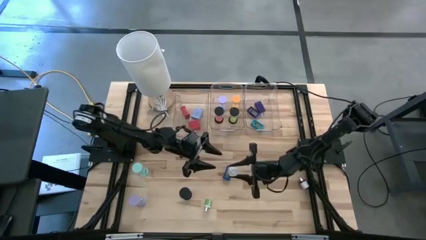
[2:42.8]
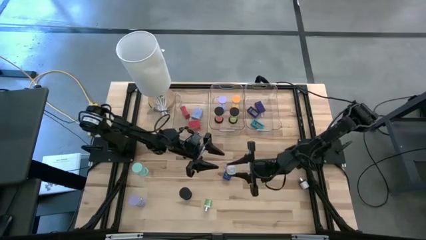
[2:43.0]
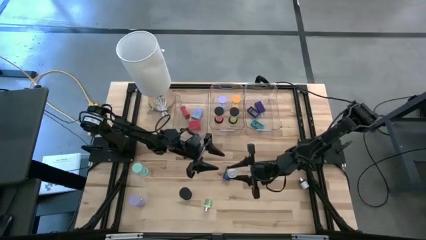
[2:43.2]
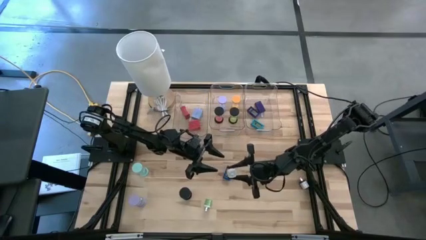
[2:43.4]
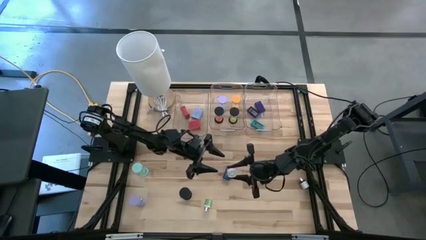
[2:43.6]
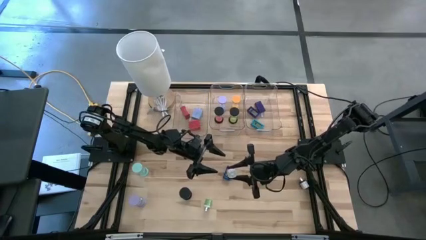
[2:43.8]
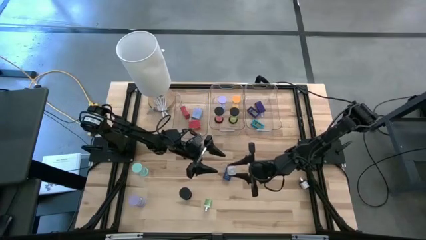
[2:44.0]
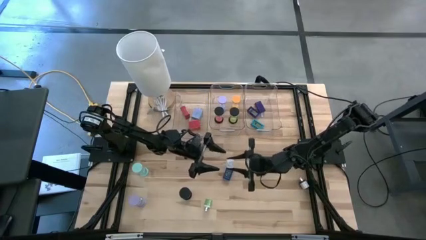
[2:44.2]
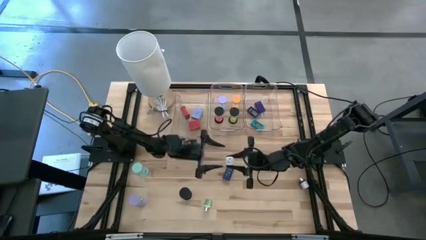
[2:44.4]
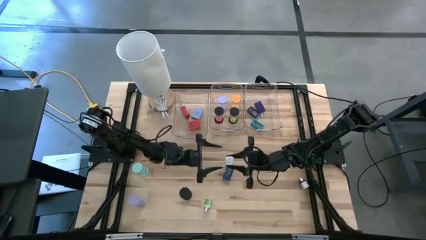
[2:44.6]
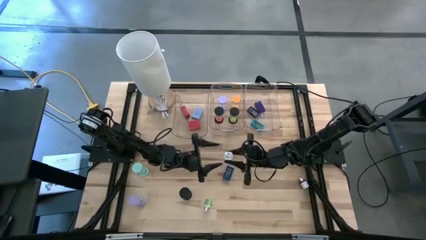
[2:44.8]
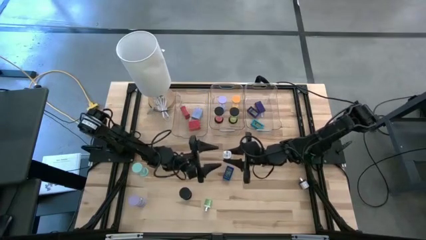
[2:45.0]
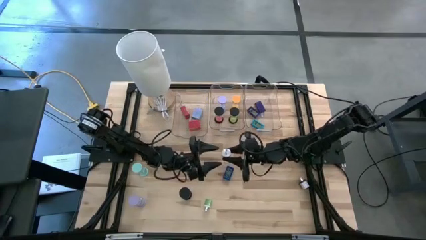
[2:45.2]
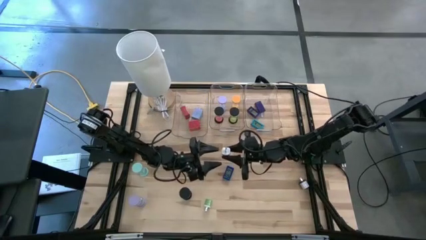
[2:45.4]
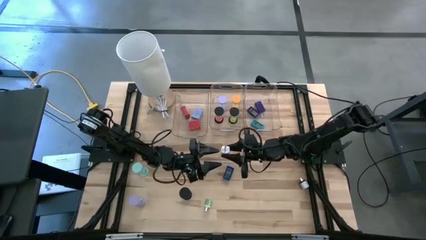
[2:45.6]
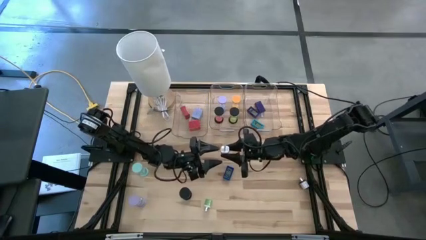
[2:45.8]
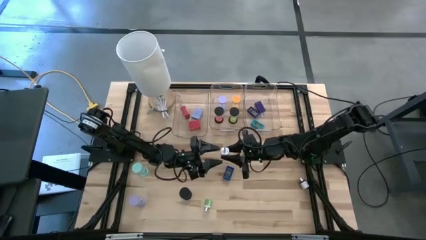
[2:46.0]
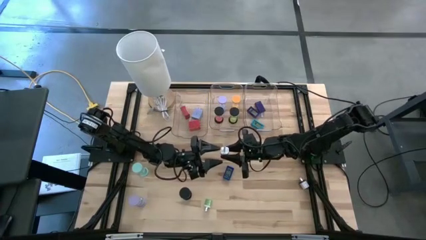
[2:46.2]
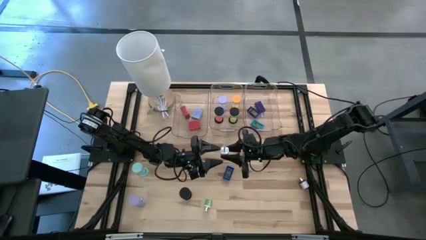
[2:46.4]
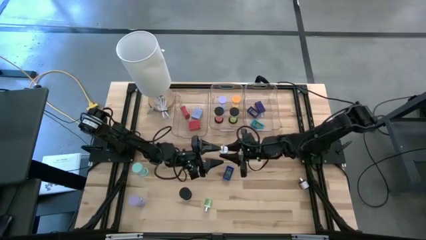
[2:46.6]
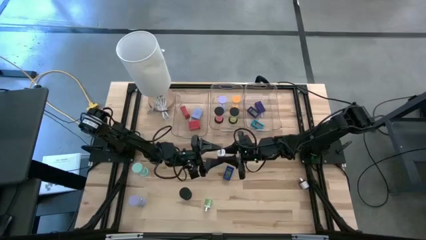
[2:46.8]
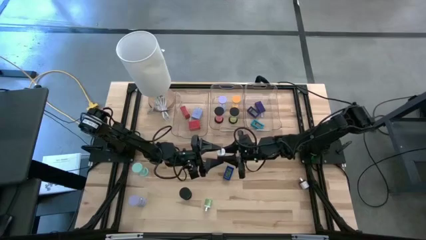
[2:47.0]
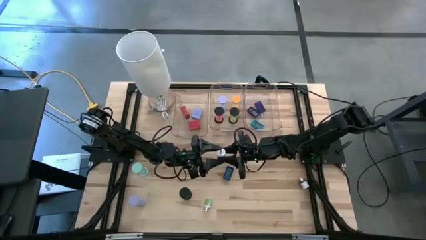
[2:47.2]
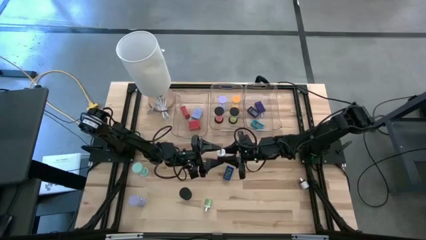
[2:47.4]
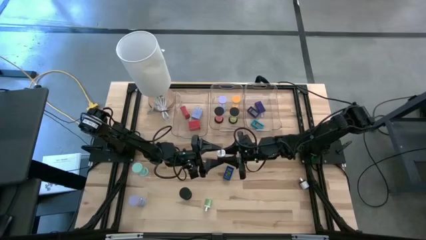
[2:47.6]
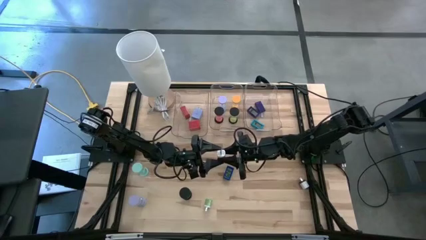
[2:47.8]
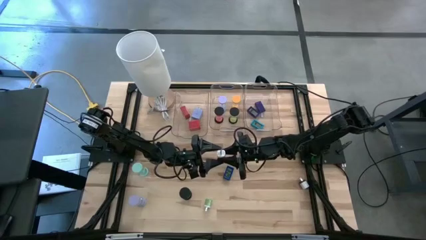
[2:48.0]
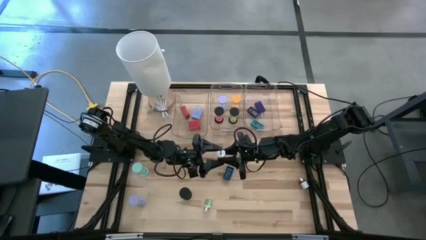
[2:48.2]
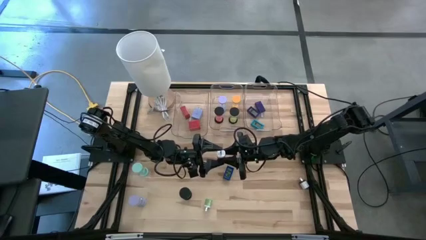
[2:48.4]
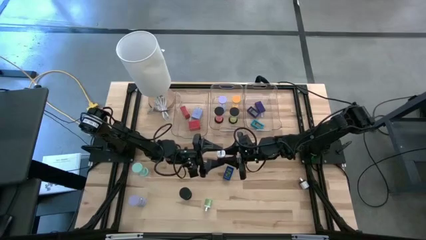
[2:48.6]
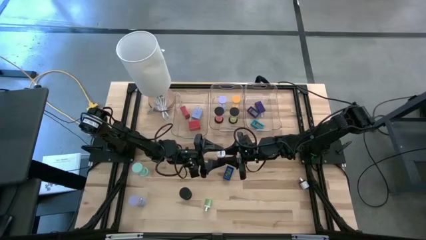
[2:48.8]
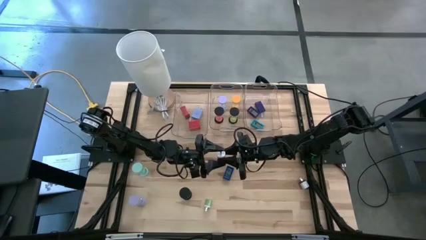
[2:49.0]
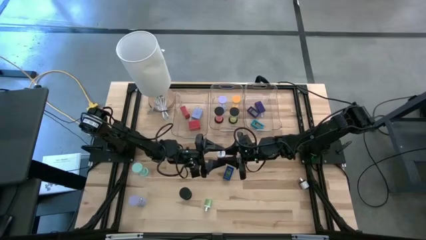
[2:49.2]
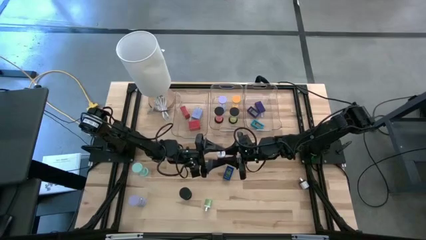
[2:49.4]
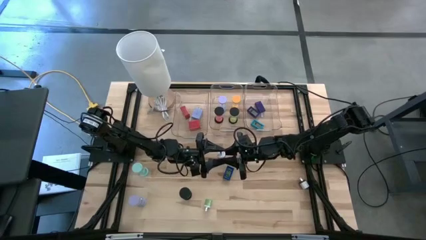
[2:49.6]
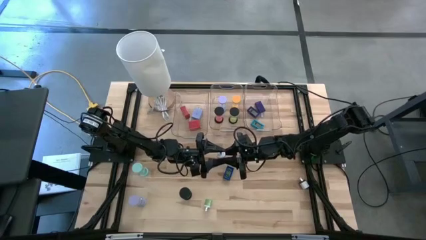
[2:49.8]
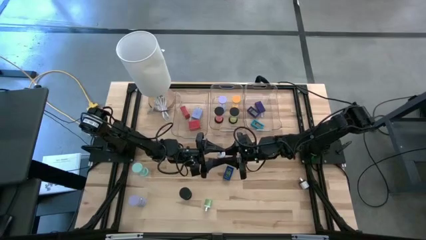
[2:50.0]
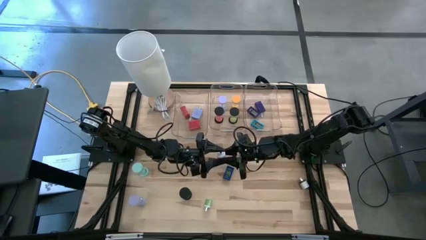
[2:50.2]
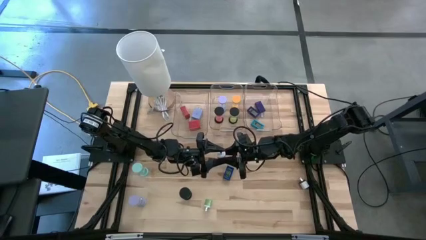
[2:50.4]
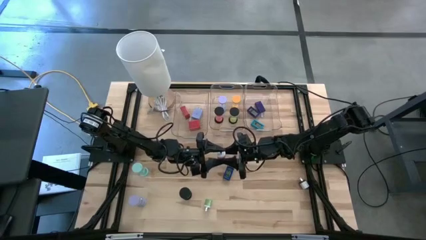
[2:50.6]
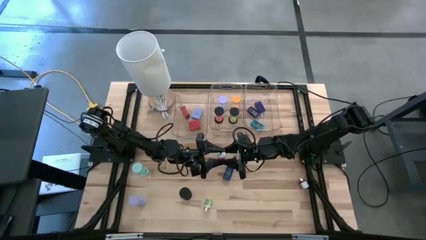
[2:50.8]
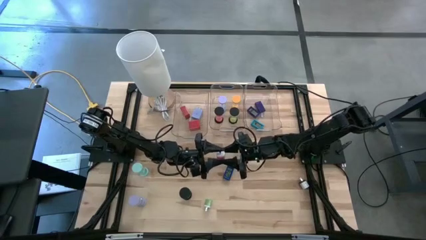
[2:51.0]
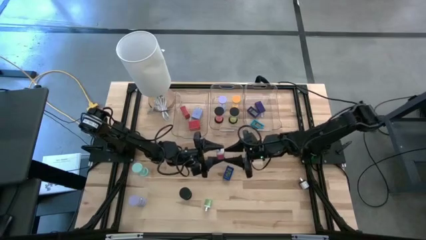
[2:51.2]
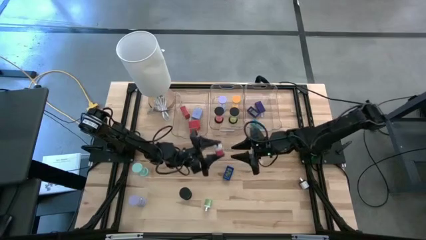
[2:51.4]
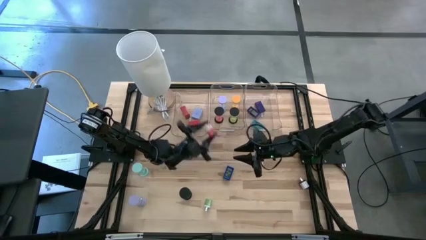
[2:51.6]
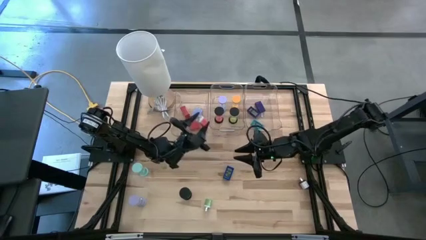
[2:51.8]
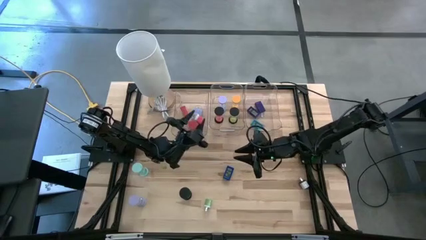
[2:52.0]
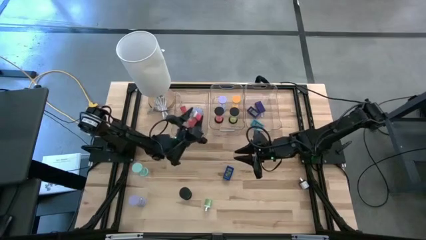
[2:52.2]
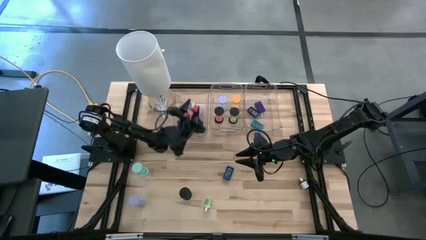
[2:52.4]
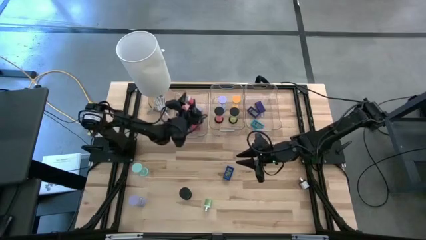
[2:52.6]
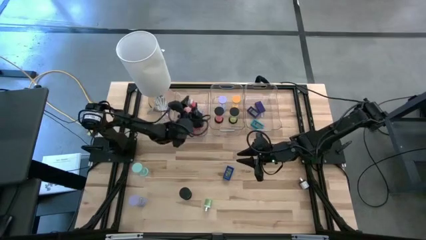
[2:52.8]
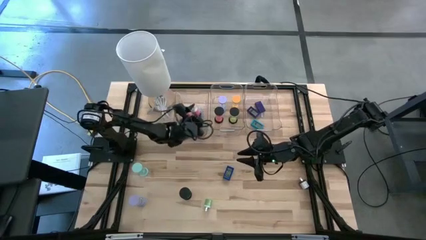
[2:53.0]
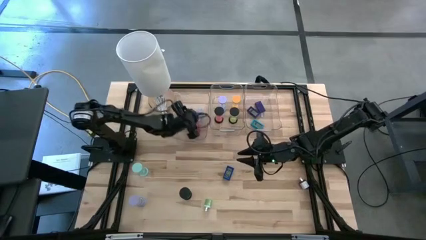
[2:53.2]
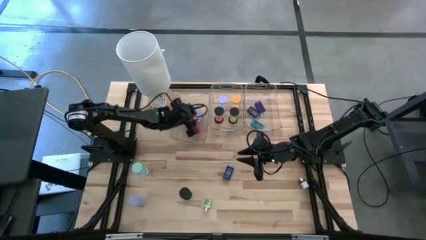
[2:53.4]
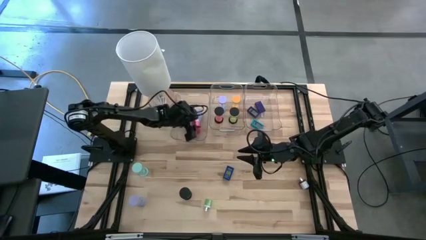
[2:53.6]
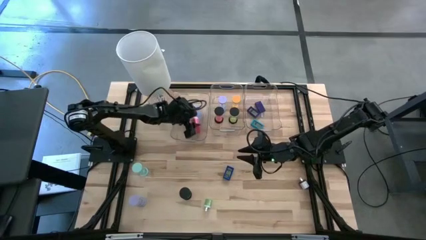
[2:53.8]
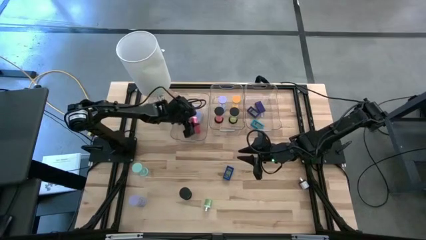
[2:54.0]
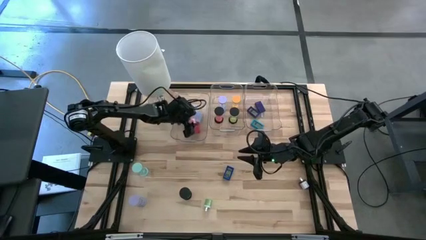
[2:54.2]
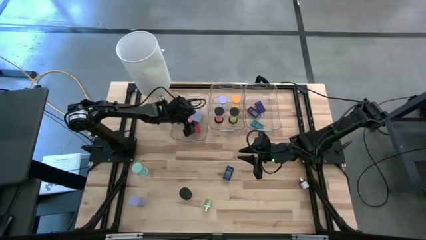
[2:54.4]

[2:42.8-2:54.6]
Task: Pick & Place Office items
Put the pink charger adapter into the left transparent bin
